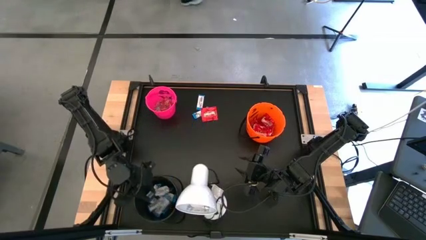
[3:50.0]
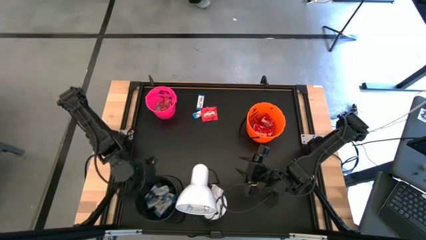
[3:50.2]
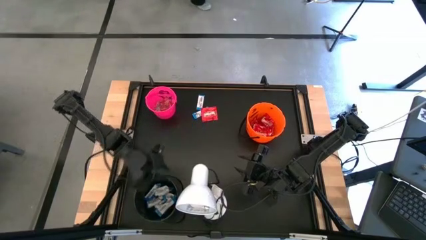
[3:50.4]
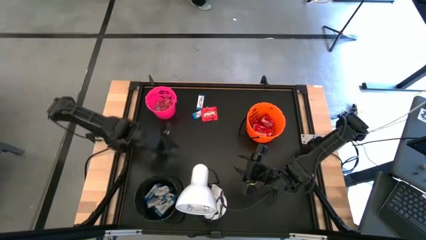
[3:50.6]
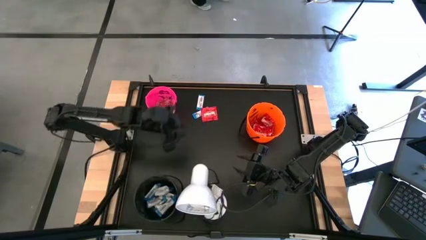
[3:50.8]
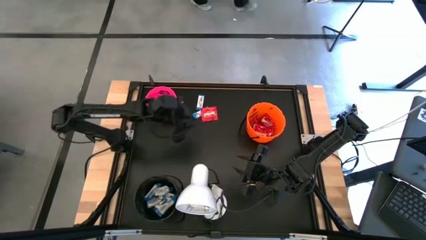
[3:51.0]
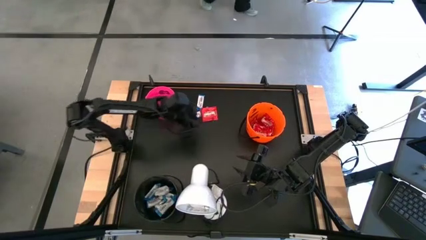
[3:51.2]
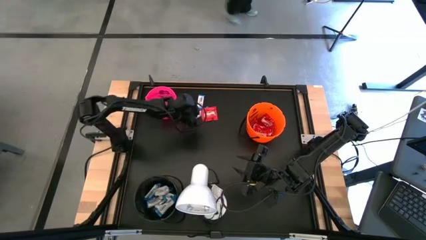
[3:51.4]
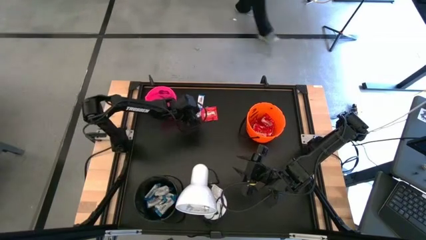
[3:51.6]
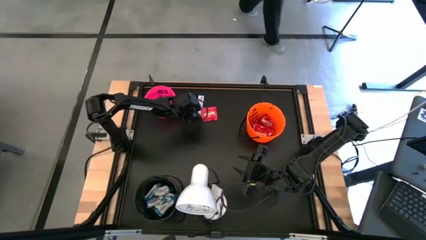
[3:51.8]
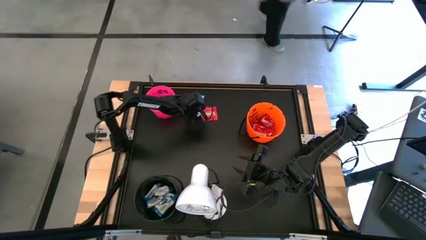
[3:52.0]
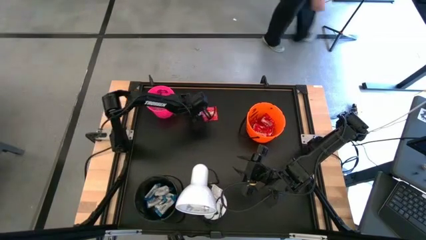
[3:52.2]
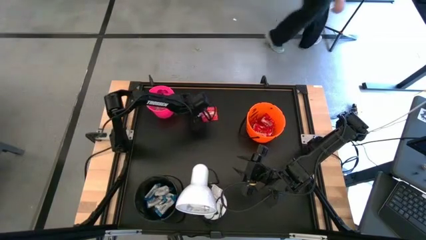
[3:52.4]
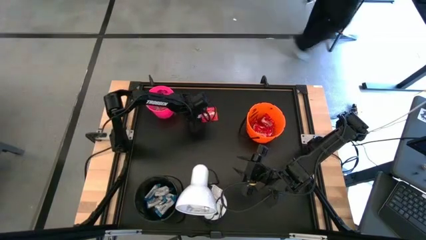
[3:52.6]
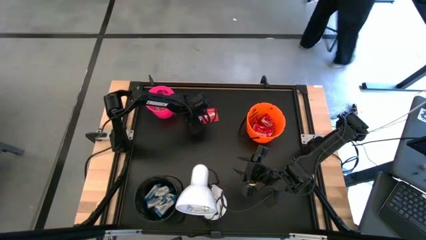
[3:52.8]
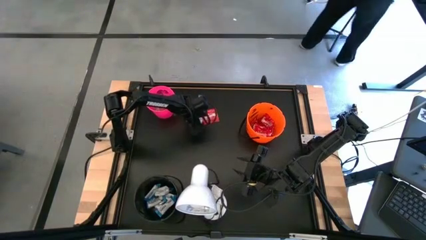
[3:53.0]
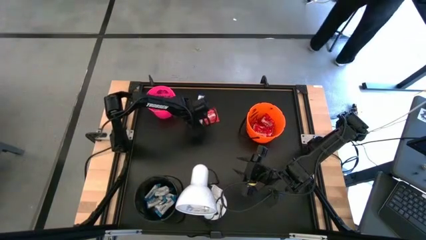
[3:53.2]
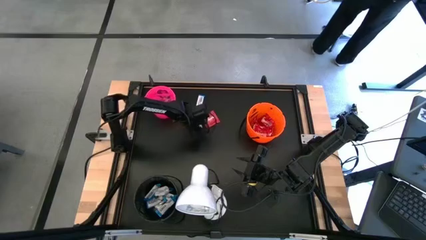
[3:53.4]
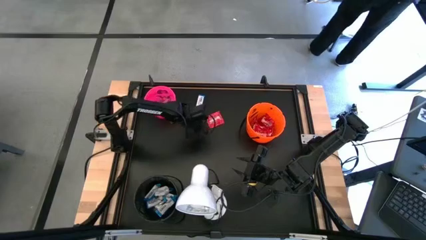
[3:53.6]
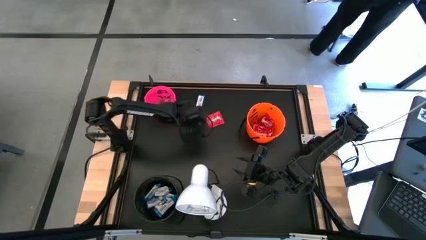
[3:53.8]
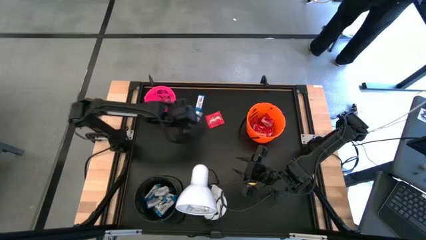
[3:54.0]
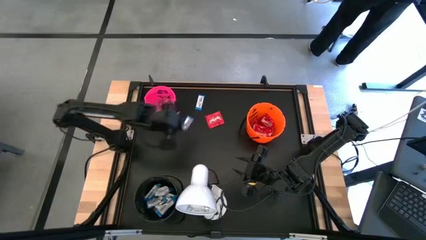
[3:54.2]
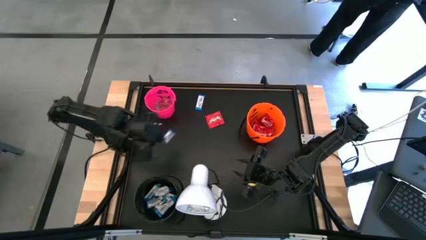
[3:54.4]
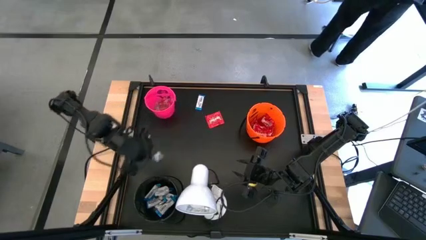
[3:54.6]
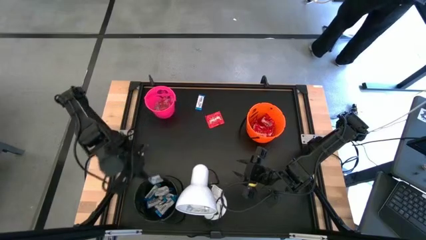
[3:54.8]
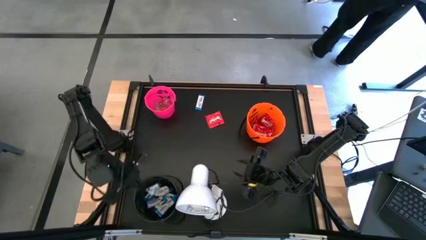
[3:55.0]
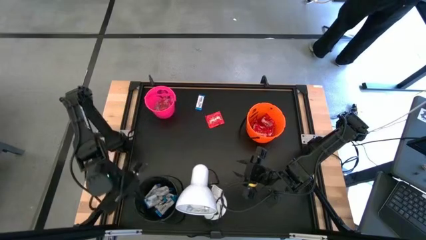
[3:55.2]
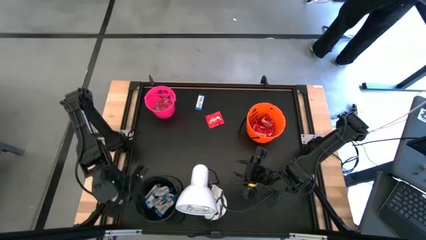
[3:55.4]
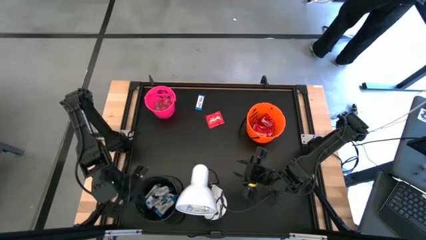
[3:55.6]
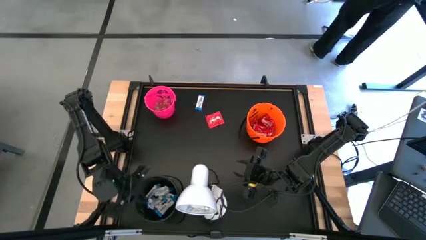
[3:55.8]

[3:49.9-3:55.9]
Task: Sort candy
Put the white chocolate into the black bucket

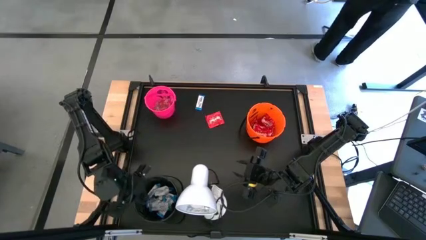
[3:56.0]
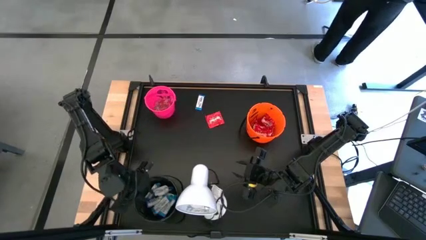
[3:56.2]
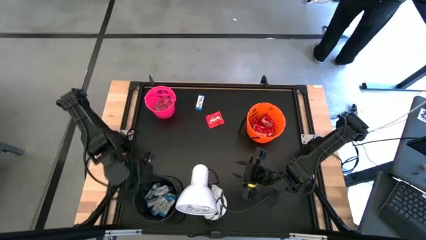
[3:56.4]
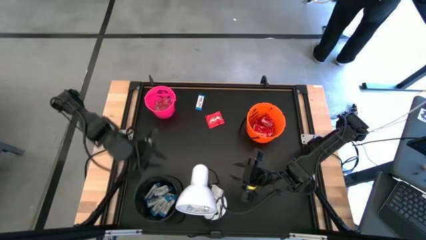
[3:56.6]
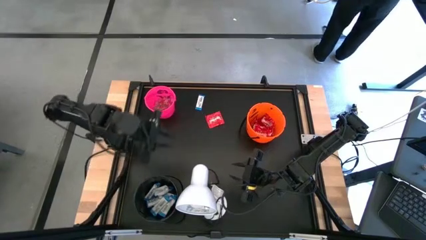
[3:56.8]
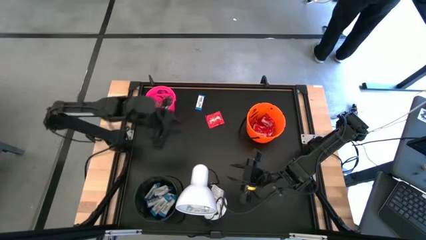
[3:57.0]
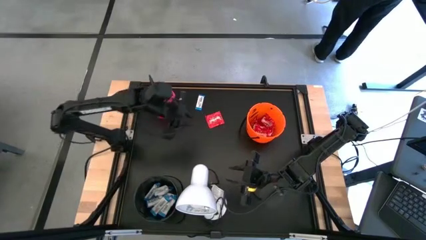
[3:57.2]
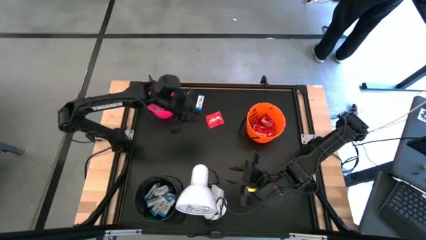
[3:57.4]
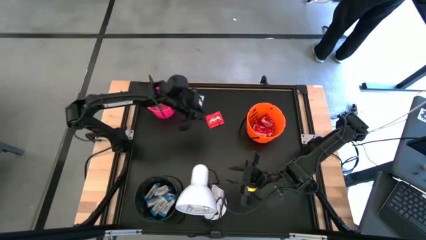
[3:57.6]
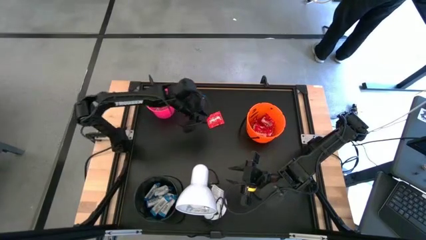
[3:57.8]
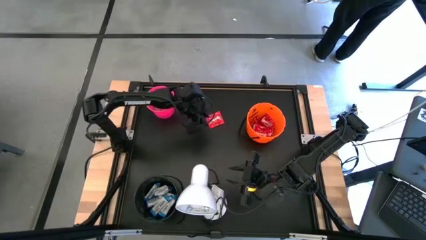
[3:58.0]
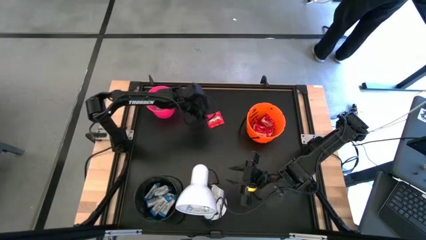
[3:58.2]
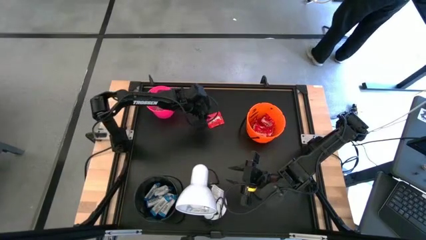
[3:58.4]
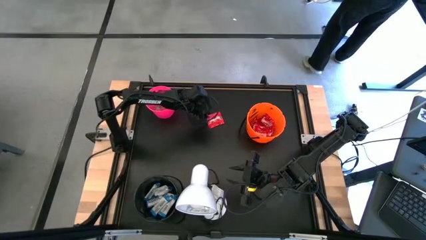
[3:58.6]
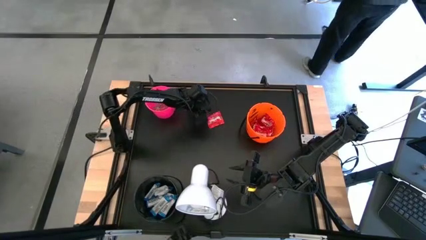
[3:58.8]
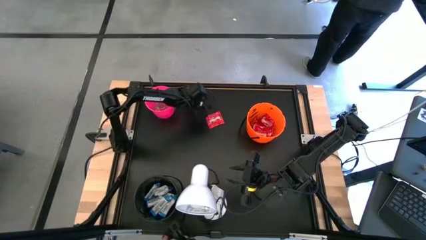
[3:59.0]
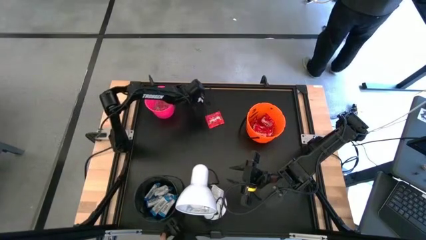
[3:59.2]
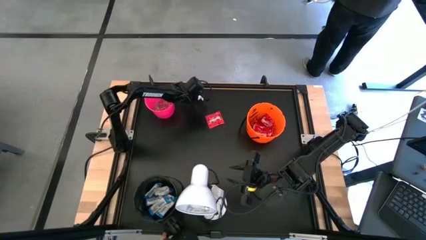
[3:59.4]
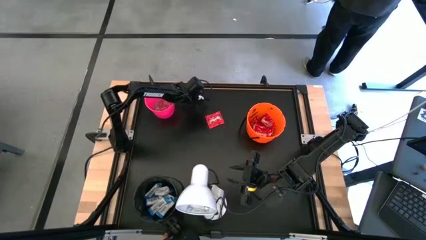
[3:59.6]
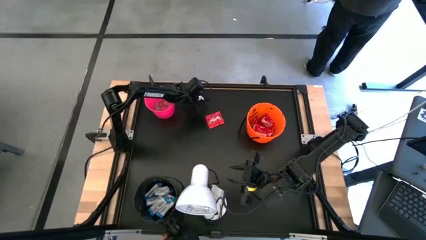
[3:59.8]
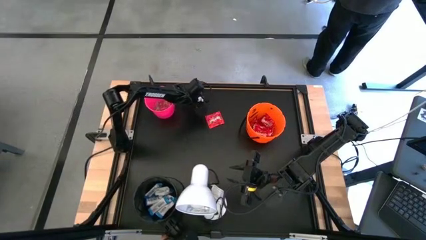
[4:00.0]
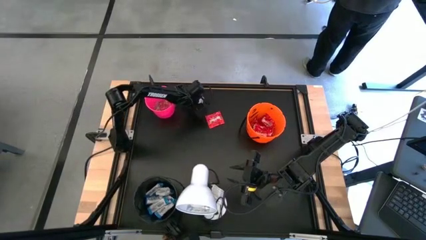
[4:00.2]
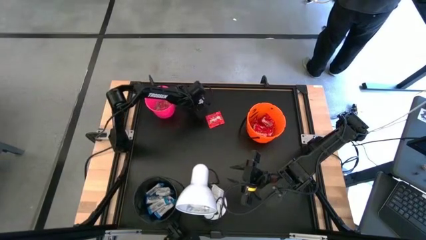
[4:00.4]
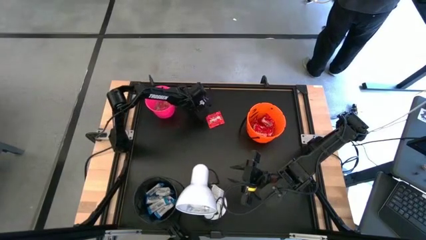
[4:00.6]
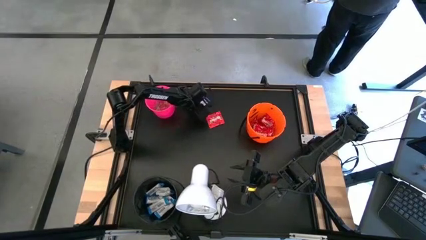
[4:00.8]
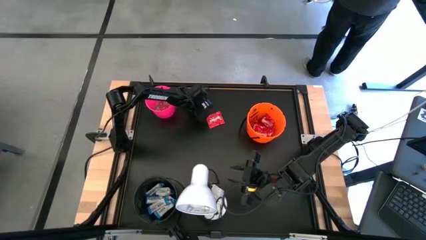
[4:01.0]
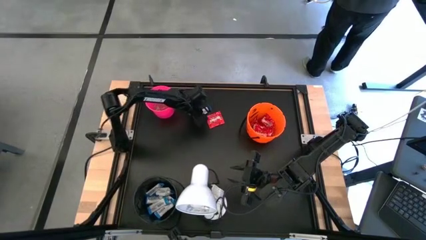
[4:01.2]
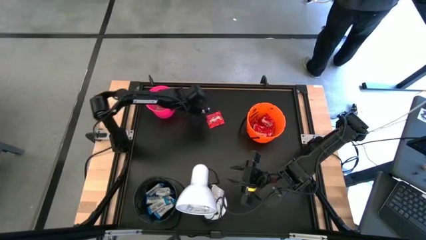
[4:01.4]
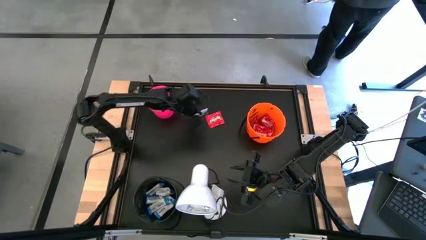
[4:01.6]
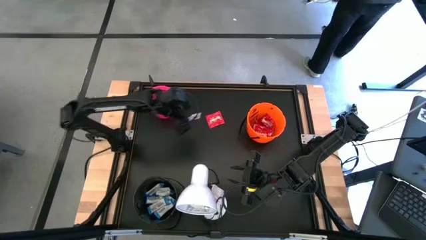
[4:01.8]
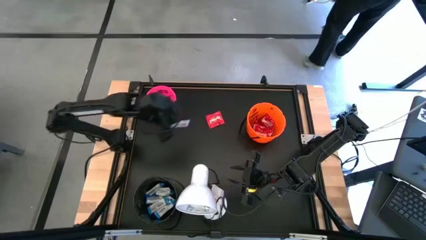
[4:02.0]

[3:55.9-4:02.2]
Put the white chocolate into the black bucket

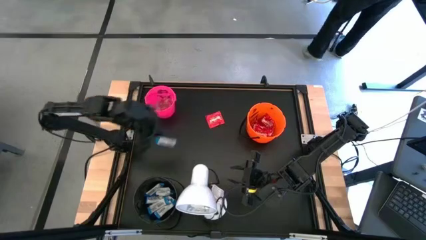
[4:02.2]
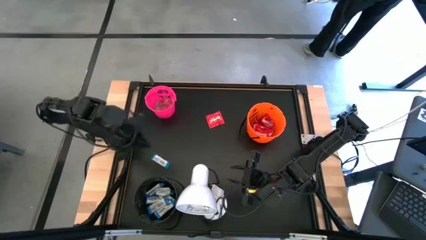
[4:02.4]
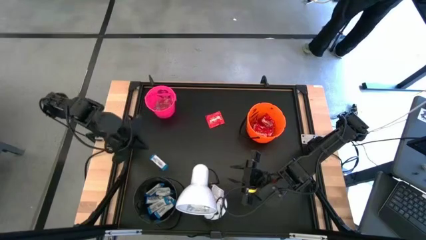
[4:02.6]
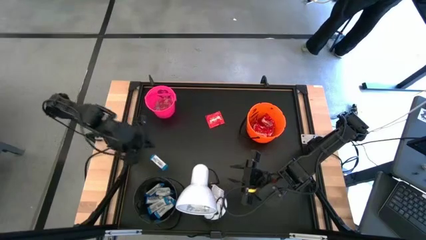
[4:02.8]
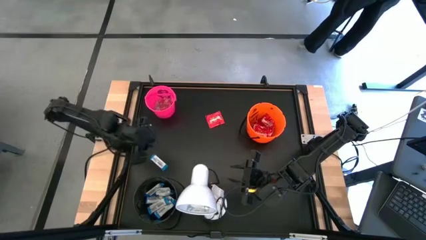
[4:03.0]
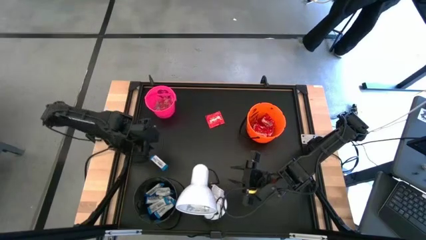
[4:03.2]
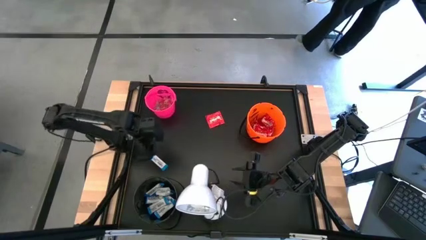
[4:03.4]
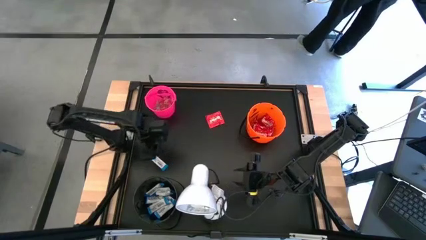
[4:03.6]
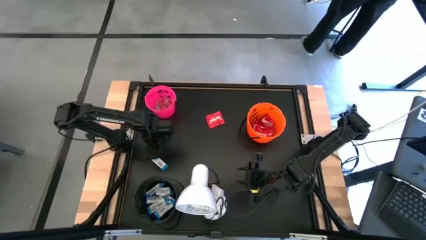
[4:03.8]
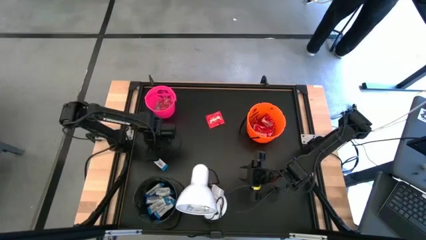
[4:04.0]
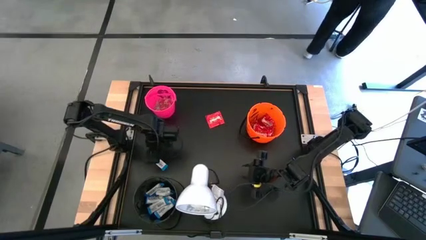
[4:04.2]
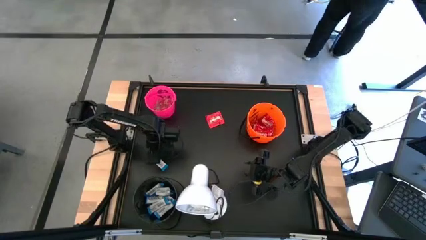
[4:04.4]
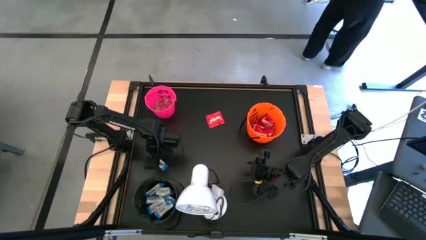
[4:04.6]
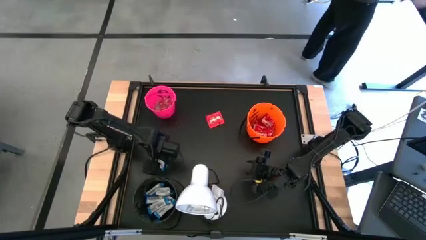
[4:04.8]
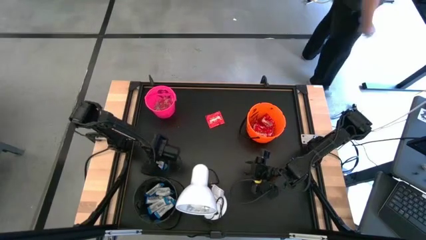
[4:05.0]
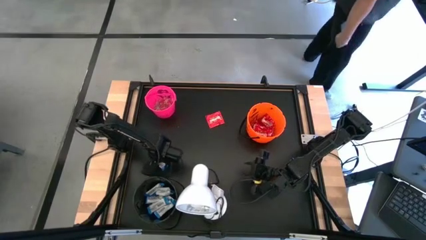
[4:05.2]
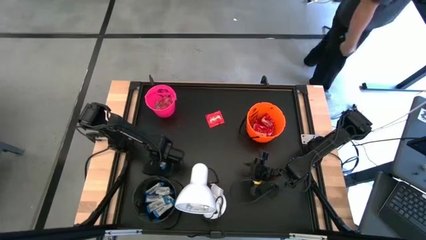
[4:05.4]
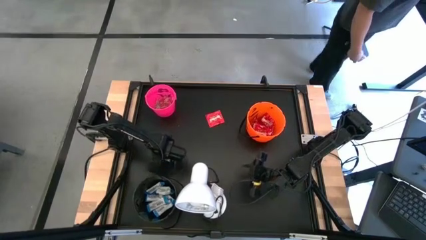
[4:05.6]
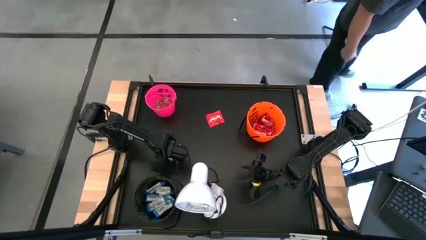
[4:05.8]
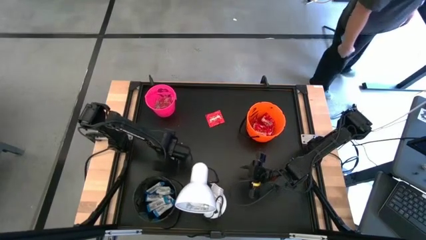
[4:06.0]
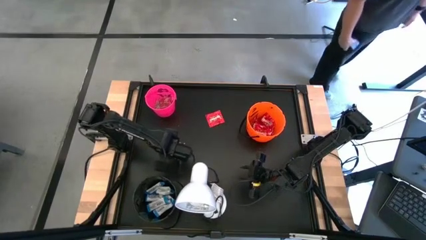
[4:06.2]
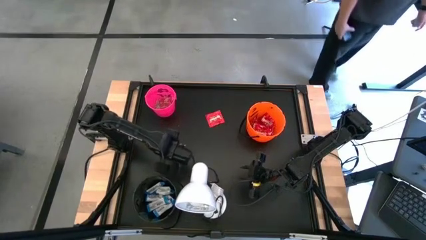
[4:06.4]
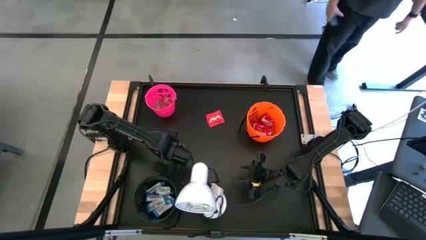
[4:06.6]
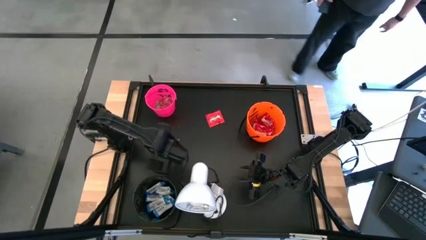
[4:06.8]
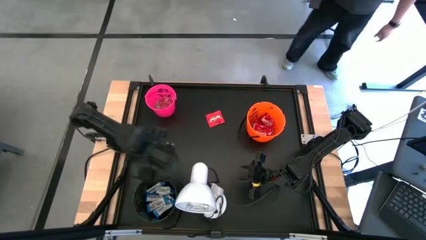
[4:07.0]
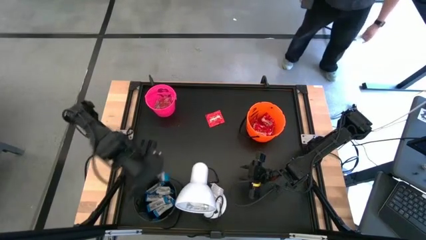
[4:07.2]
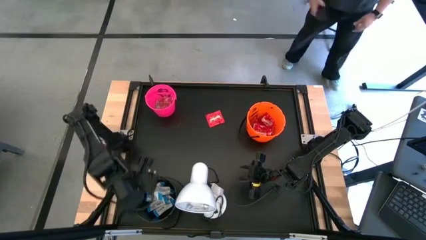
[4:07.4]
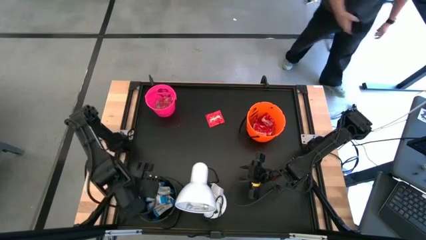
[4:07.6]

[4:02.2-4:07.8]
Put the white chocolate into the black bucket
